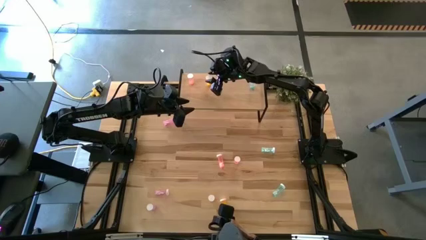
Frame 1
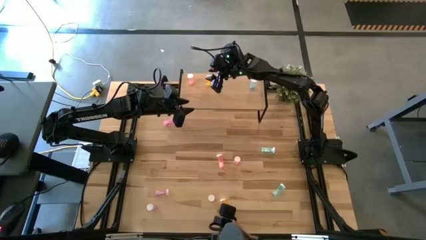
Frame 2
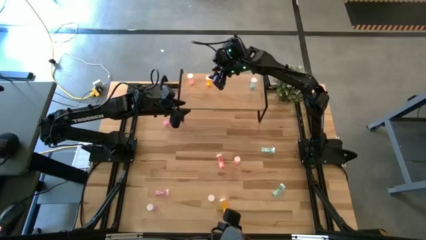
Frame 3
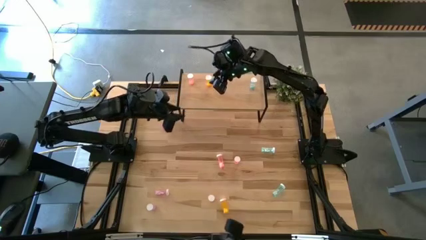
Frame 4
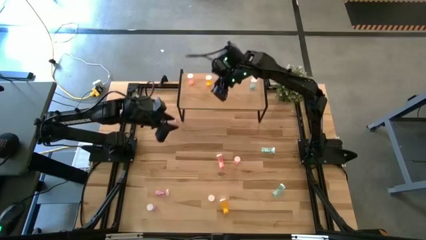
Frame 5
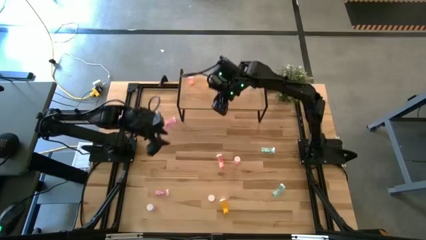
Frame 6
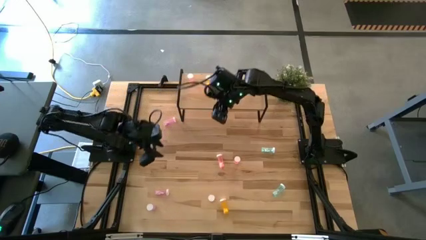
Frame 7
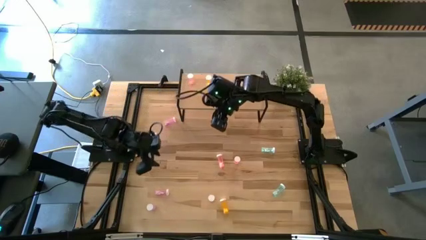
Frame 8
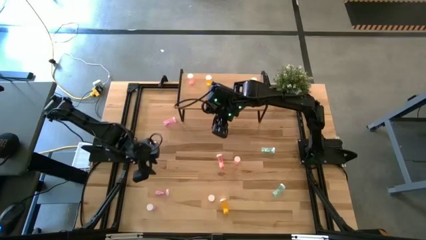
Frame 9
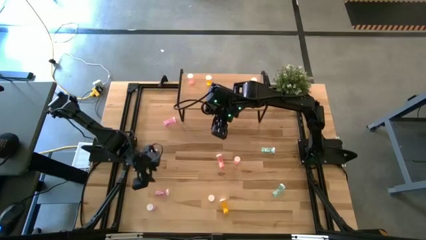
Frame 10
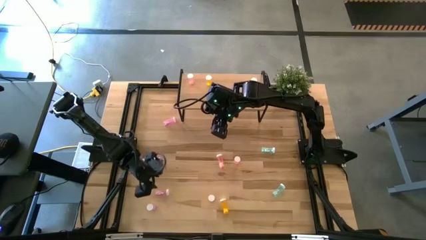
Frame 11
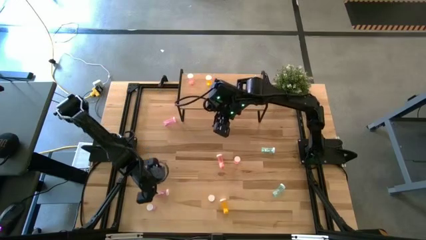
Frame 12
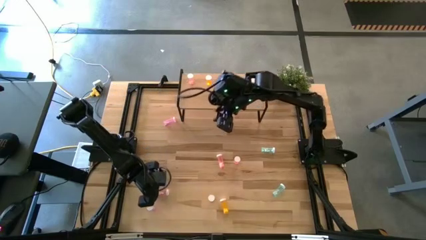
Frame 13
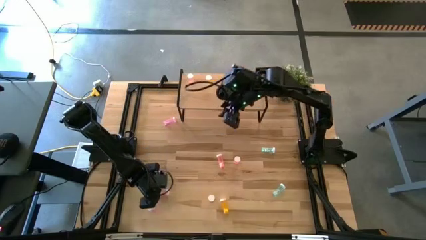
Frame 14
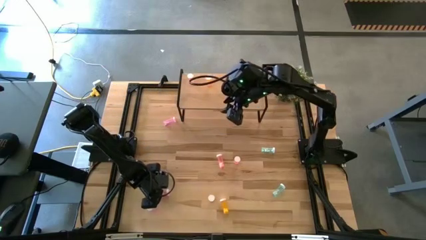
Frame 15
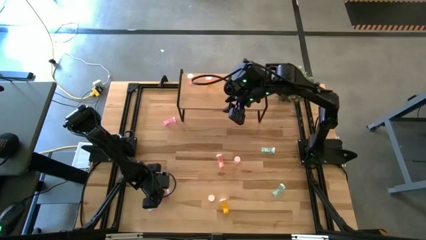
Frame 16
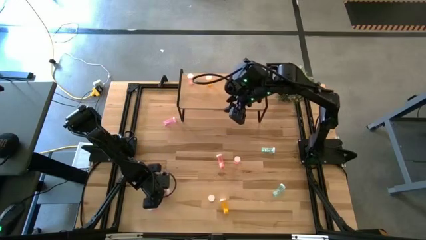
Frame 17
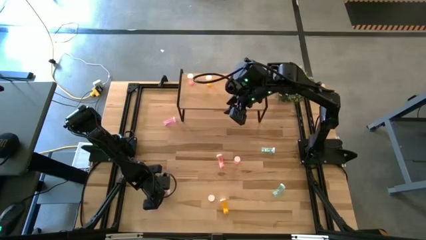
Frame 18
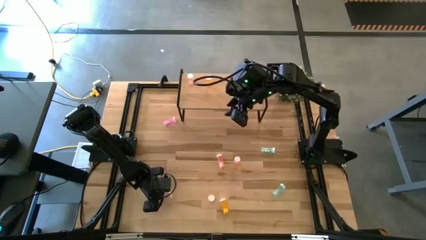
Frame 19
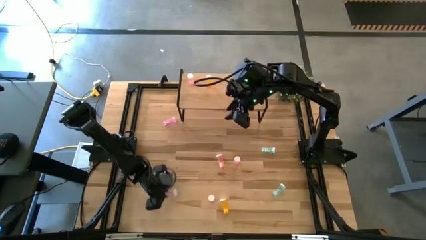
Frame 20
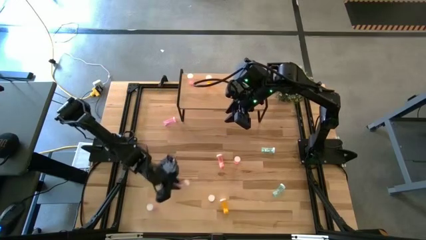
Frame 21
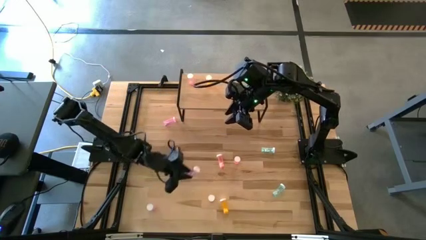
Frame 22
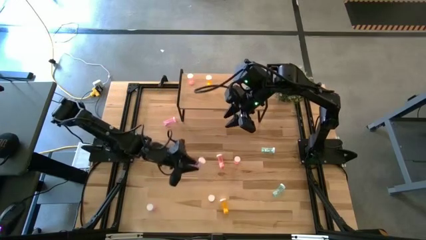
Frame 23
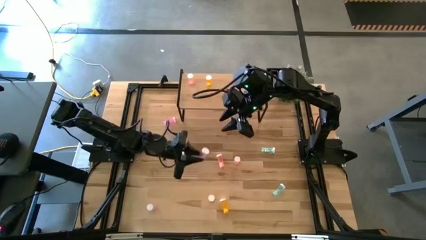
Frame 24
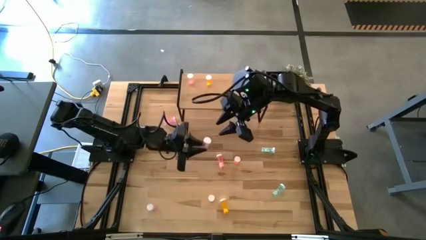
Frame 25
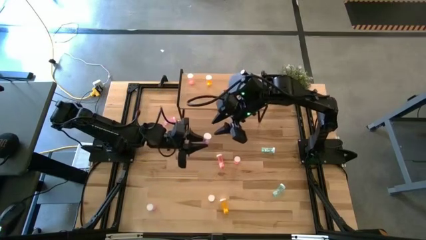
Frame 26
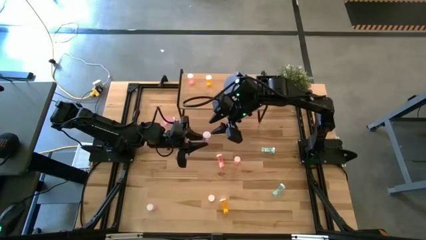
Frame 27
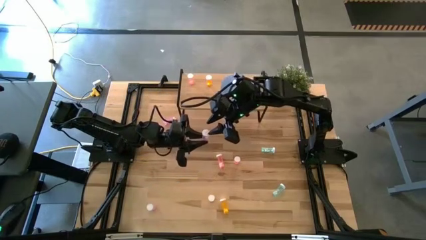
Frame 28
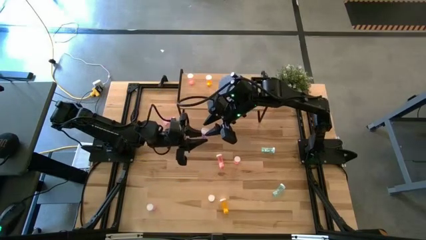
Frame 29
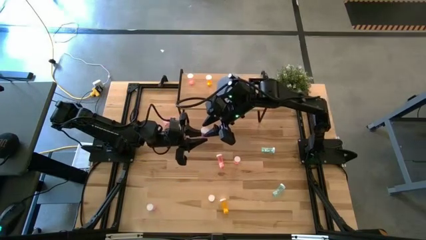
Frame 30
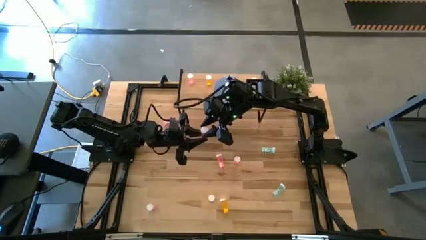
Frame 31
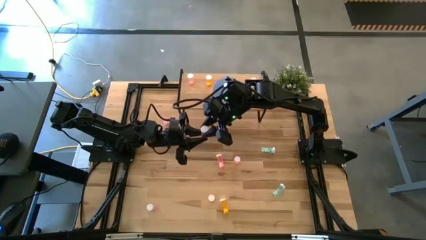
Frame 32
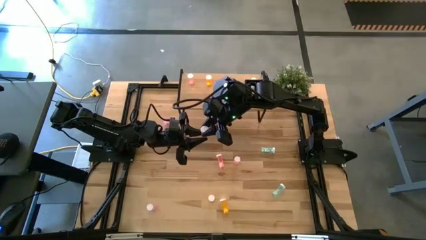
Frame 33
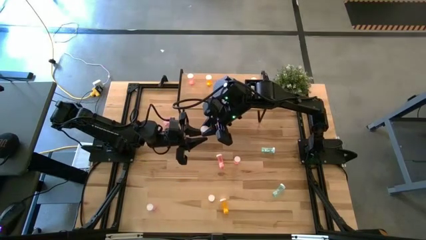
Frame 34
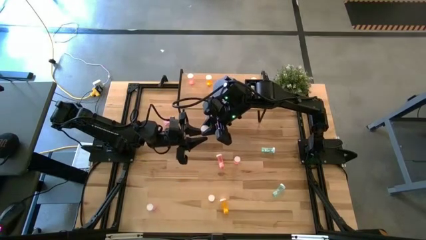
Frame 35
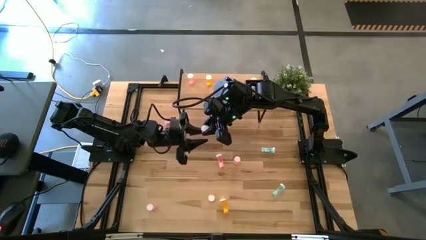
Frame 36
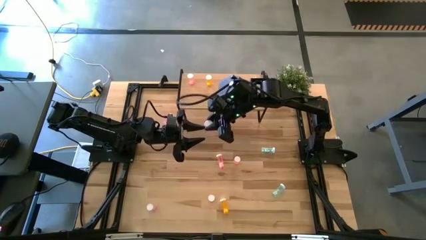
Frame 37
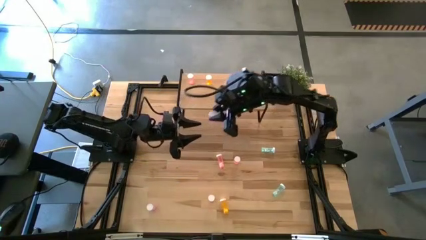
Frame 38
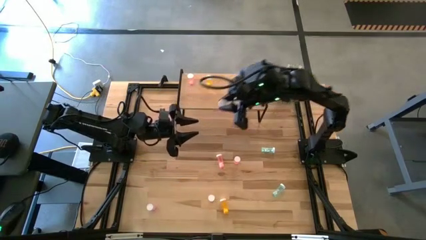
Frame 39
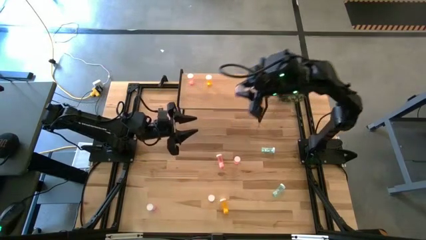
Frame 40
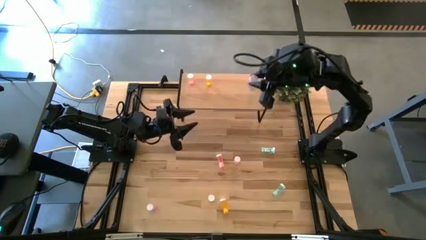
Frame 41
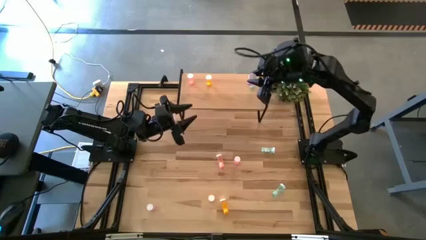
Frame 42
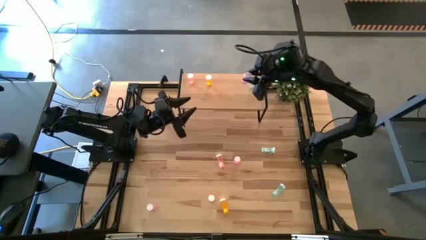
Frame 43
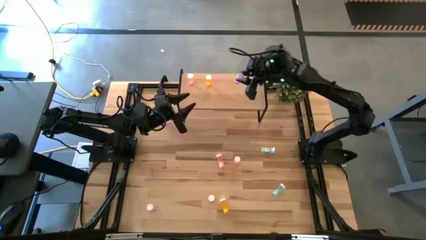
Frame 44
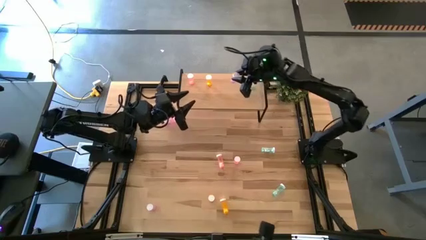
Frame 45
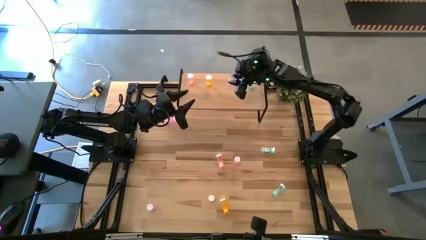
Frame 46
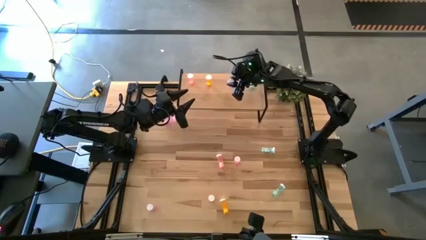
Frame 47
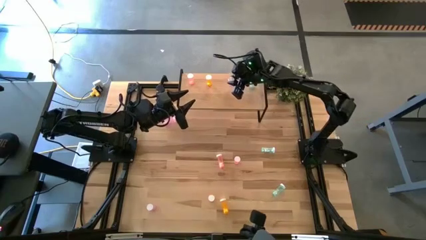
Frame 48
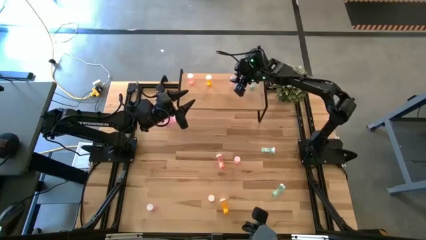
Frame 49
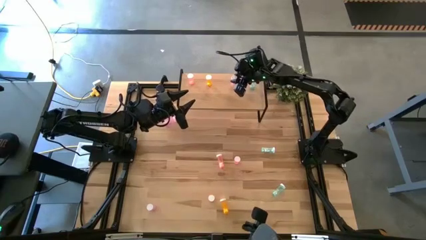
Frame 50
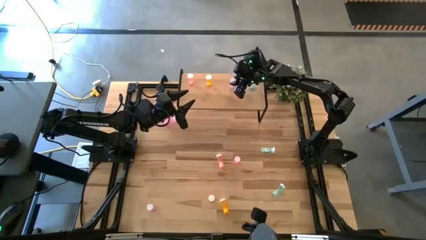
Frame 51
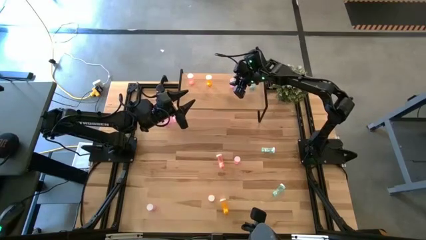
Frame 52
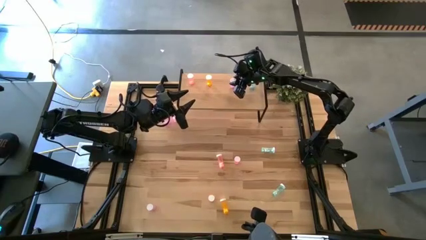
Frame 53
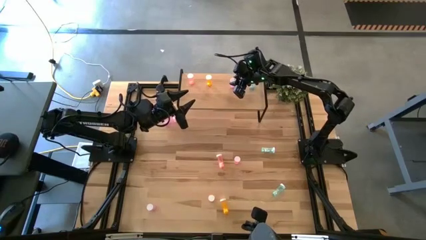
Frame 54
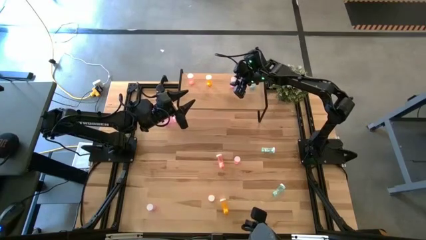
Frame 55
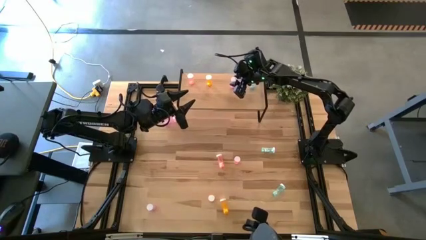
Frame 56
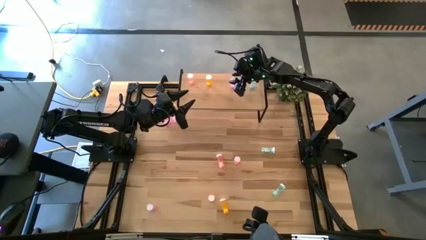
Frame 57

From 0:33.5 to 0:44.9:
Task: Pick and place medicine bottles onto shelf by color
Put the middle purple pill bottle on the shelf

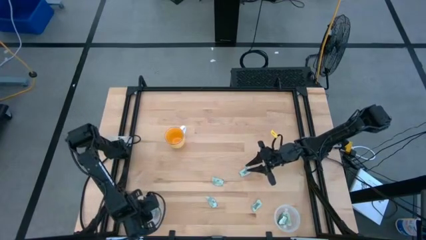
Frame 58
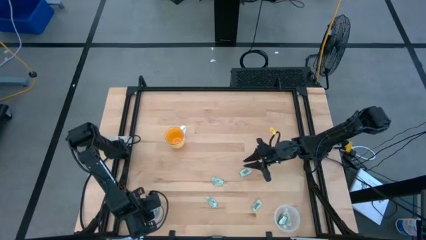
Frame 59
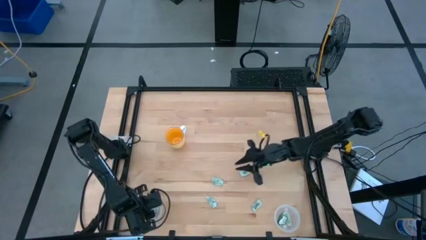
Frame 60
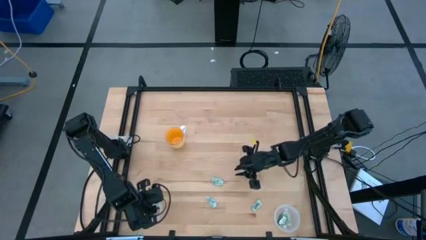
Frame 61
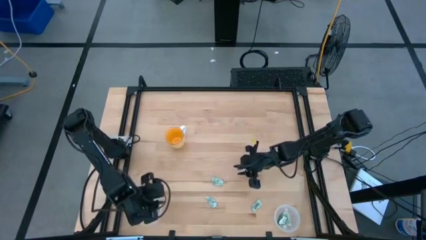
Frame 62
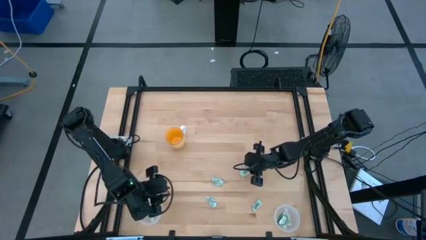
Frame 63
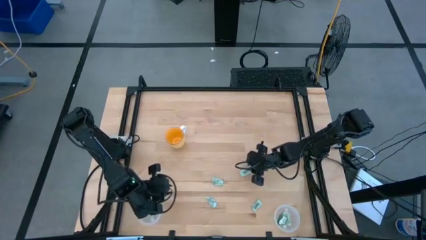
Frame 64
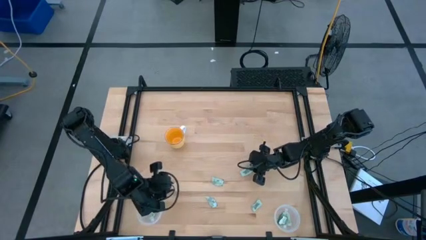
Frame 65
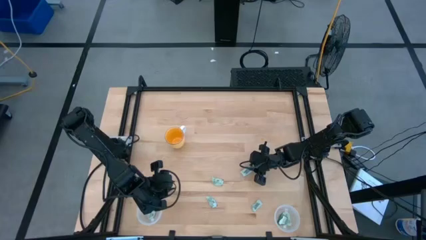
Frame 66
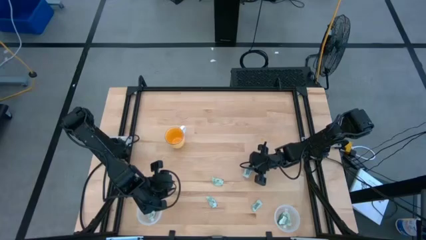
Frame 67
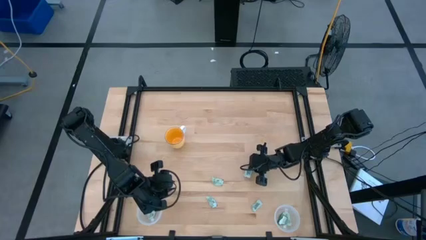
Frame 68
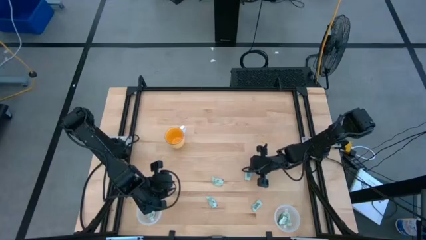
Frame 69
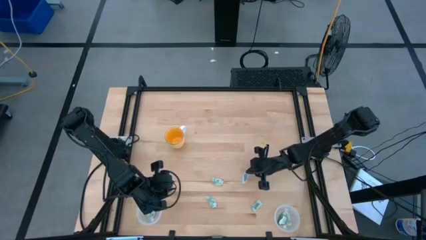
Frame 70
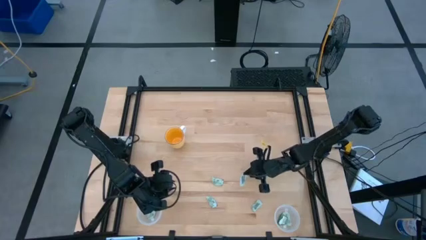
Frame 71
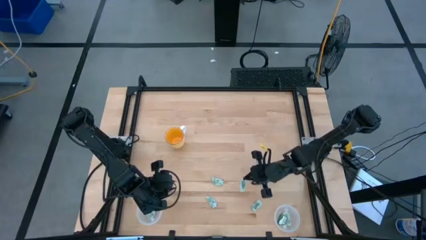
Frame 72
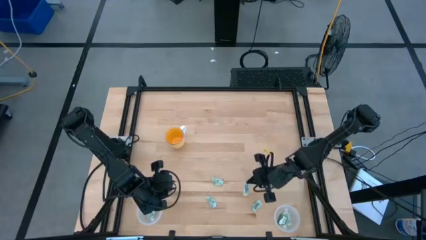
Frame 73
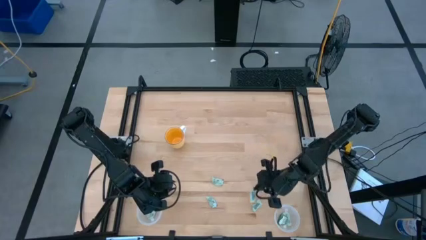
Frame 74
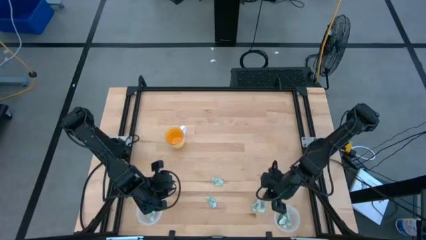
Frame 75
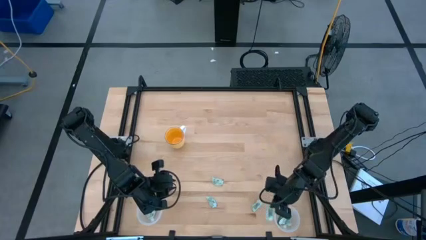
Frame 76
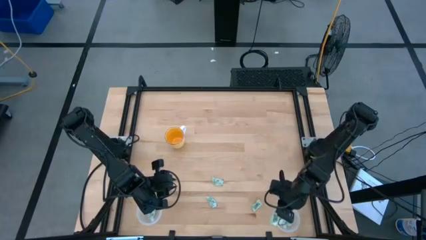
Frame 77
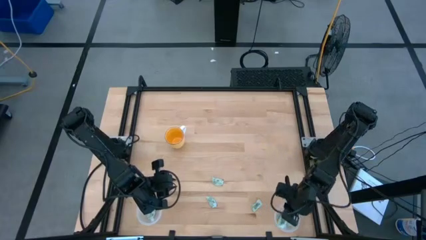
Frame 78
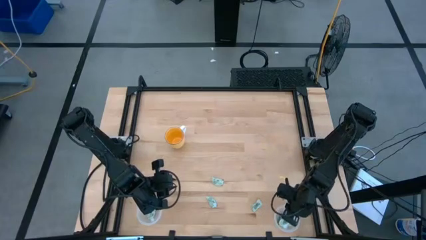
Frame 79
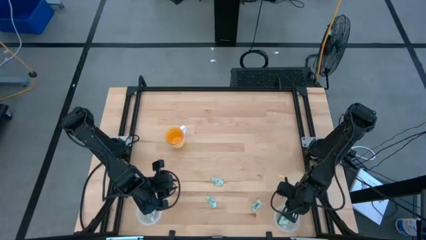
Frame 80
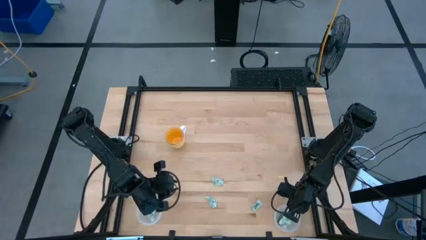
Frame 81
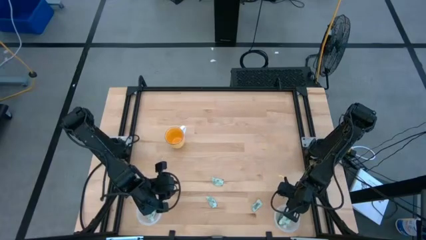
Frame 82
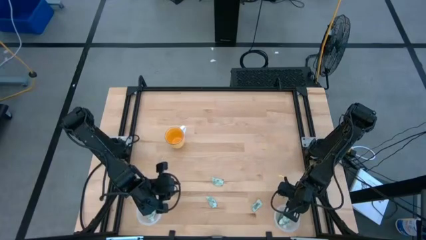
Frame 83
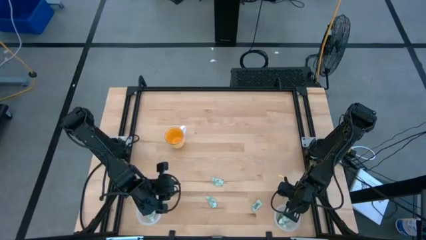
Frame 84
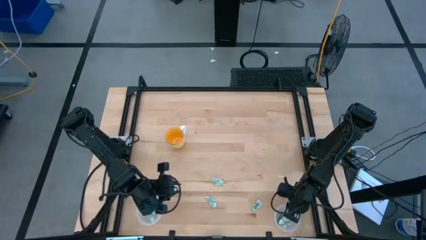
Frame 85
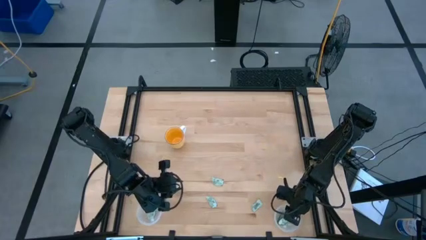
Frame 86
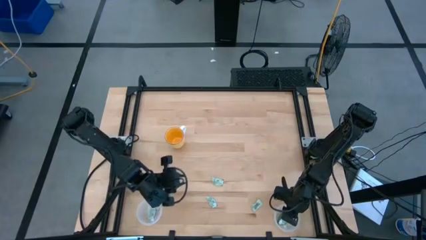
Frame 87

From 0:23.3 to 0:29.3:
Task: Pick and place items into bin
Put the stevia packet into the right transparent bin
